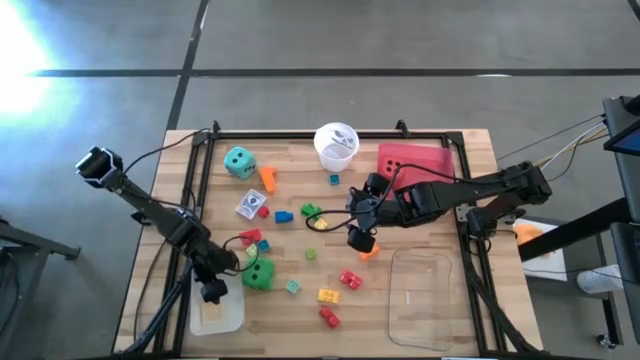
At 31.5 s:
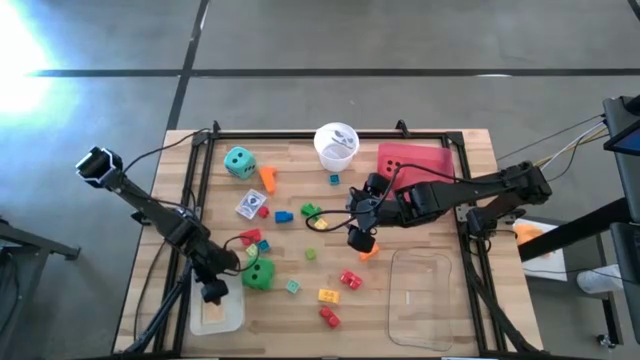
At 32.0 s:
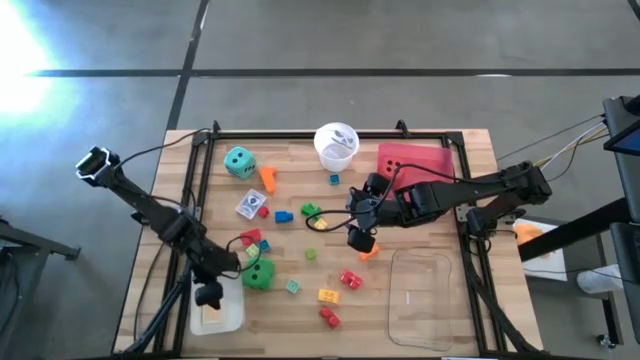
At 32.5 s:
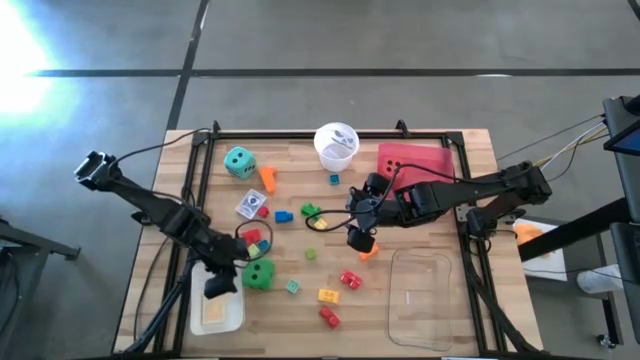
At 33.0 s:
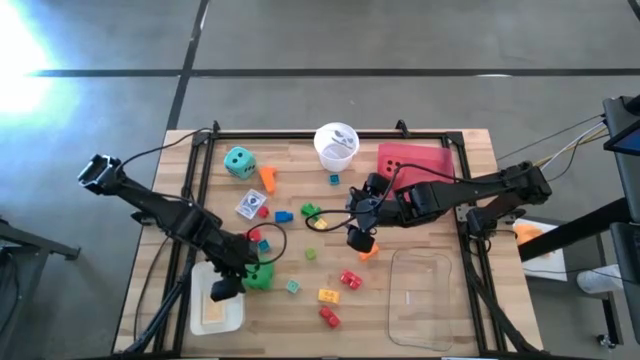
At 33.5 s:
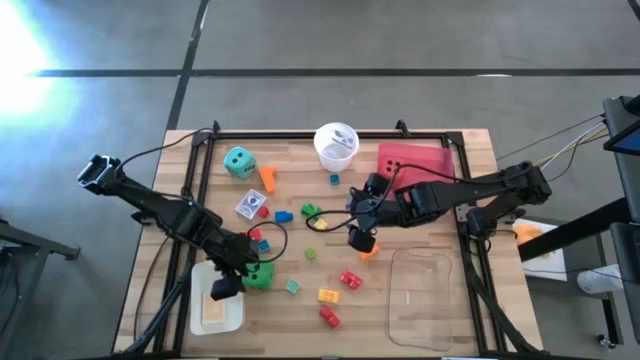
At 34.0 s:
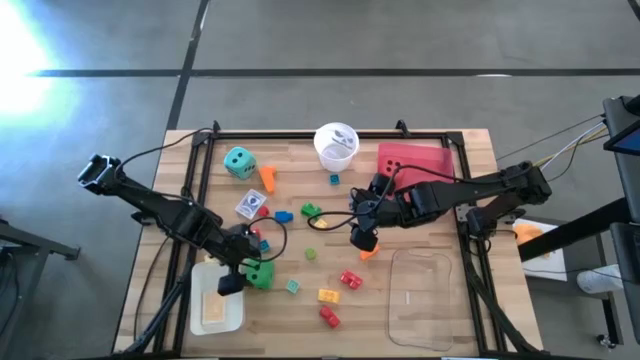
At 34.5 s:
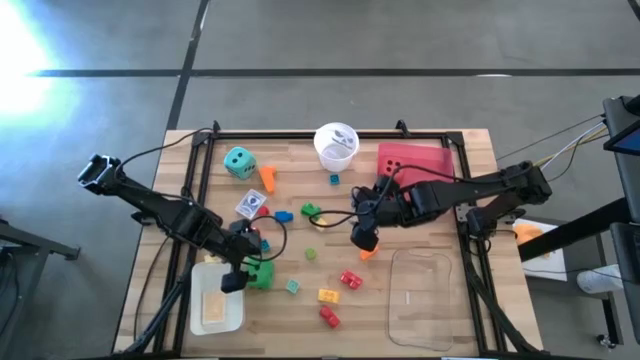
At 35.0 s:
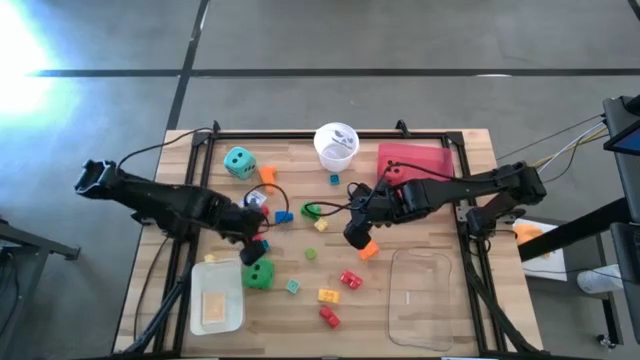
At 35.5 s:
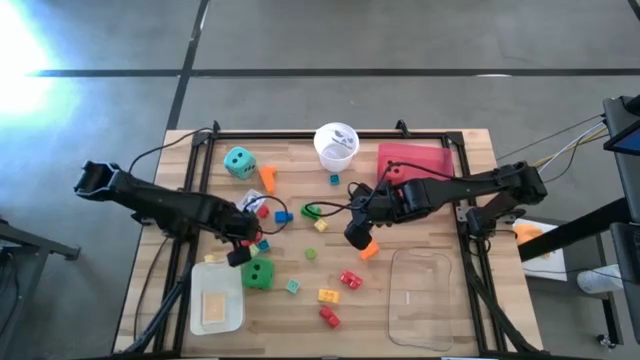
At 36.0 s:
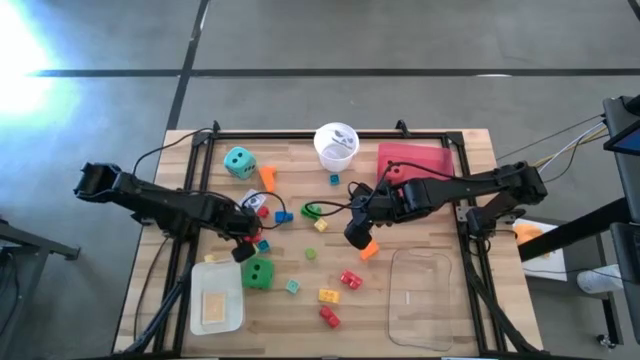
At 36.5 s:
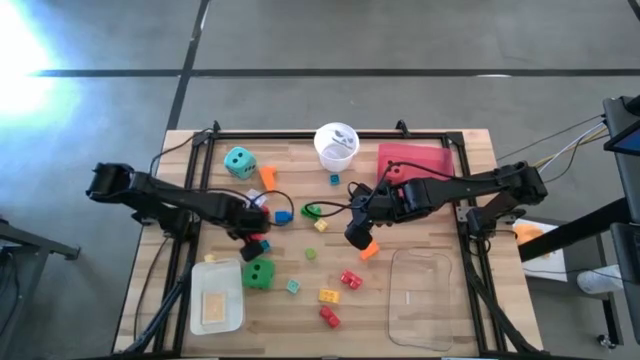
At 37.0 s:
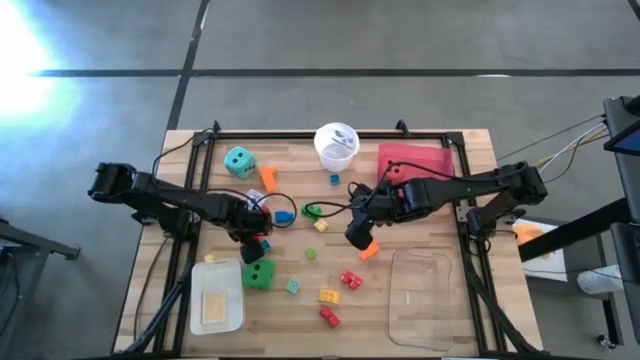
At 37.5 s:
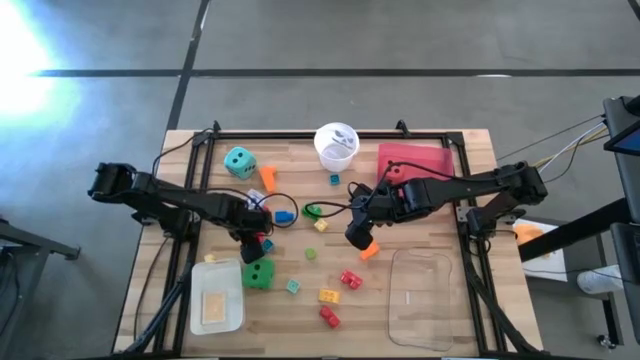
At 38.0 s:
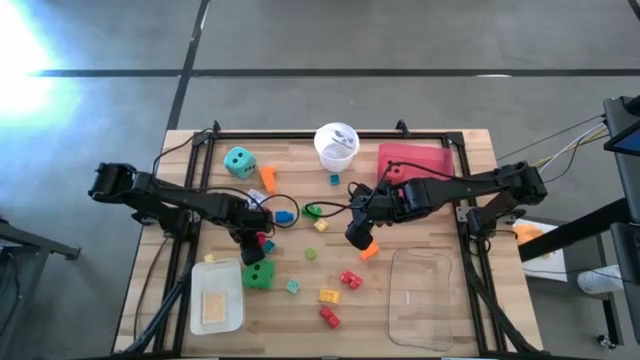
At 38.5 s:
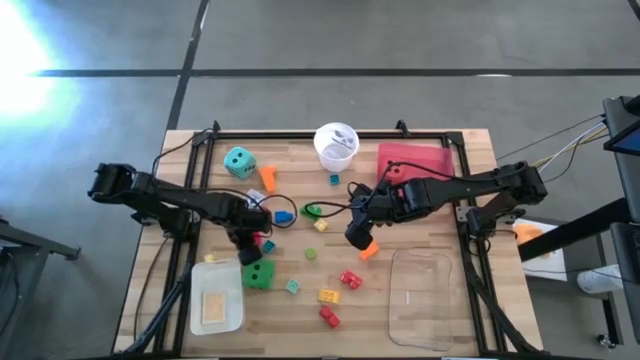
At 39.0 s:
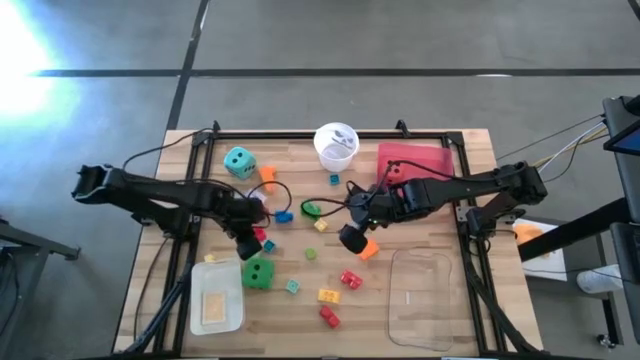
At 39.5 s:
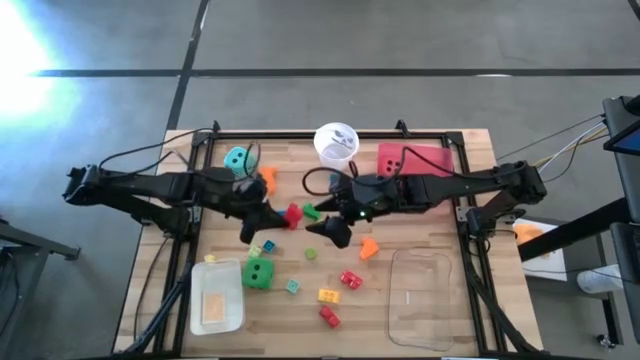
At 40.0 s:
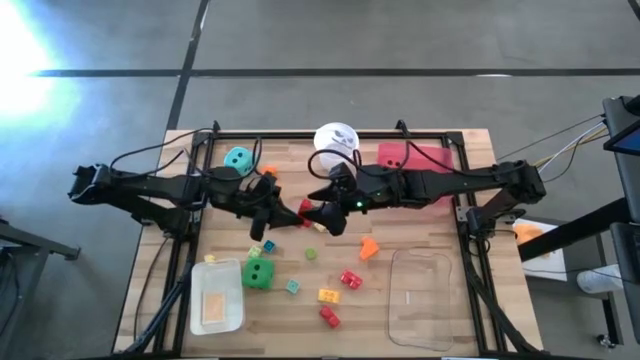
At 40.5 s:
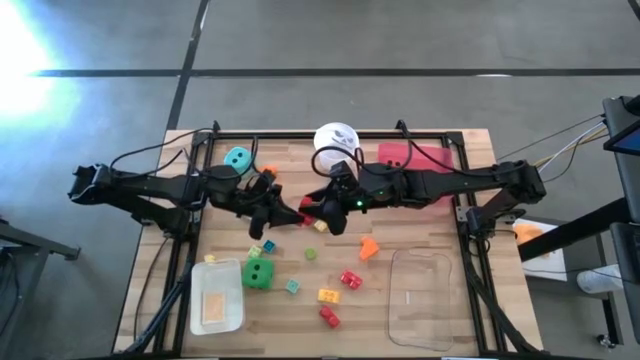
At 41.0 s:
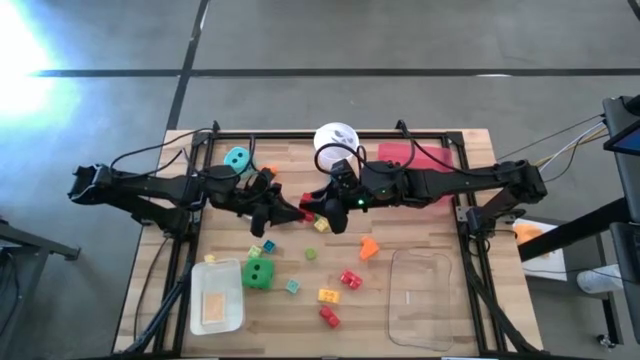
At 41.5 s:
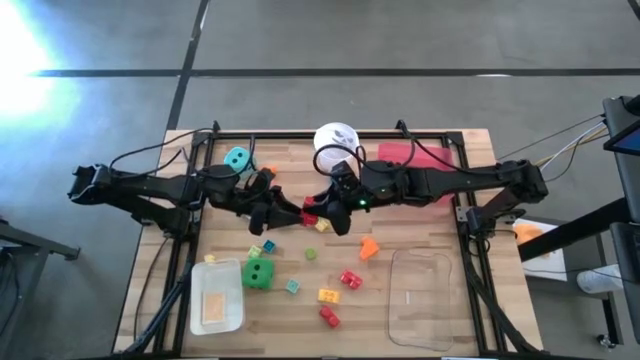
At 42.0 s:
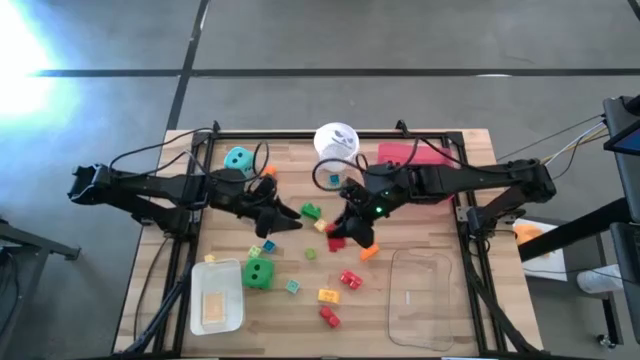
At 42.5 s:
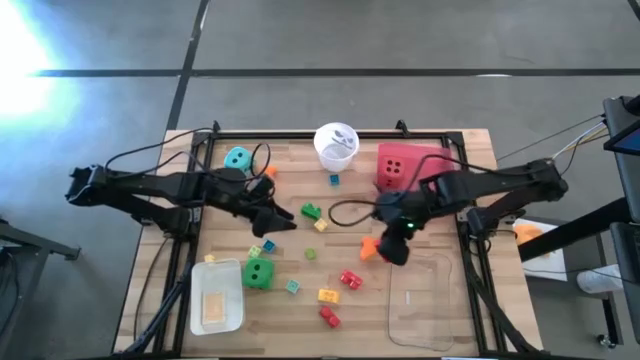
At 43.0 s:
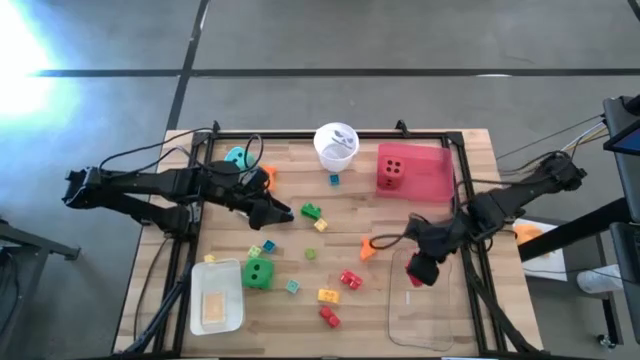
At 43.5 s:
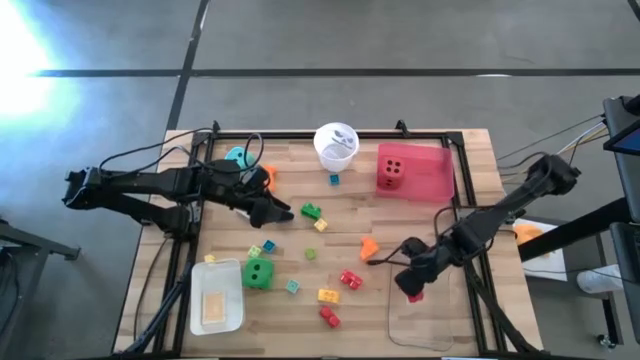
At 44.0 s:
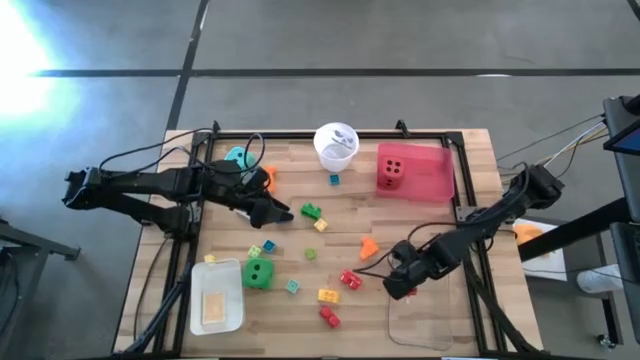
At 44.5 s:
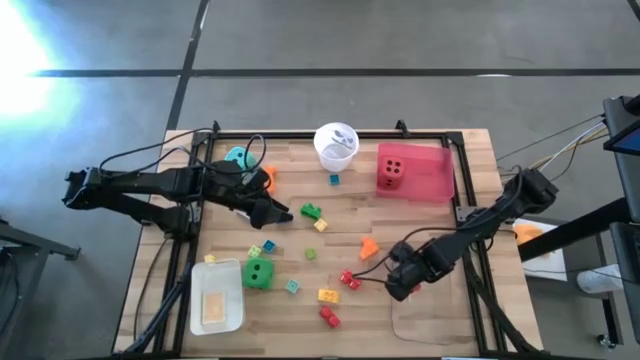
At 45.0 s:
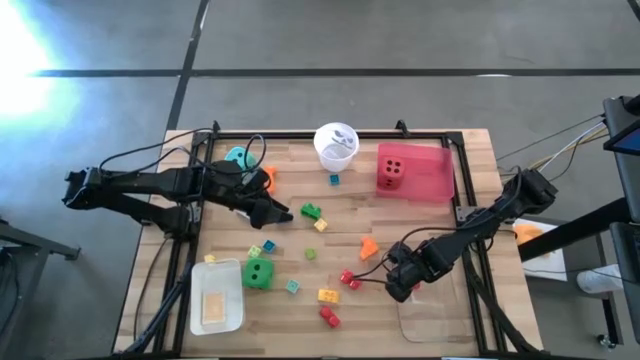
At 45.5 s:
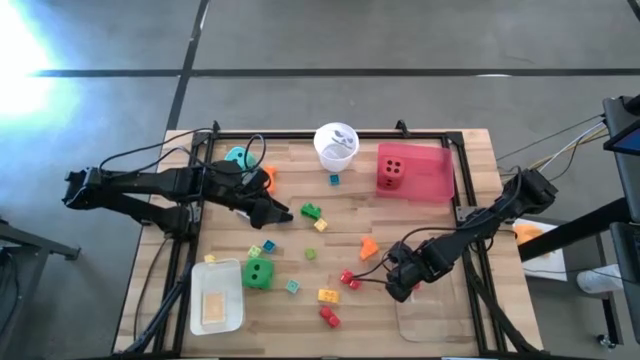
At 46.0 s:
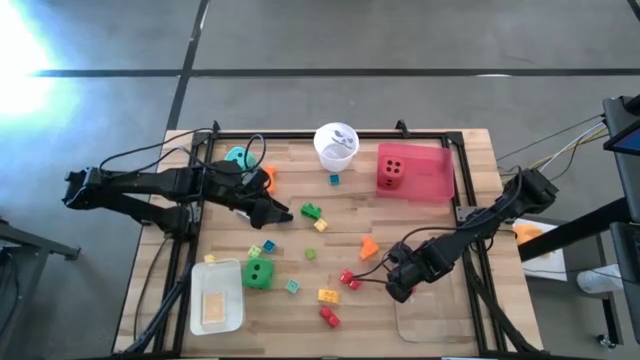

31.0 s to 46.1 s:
Task: Pick & Place Toys
Put the red game piece into the transparent bin

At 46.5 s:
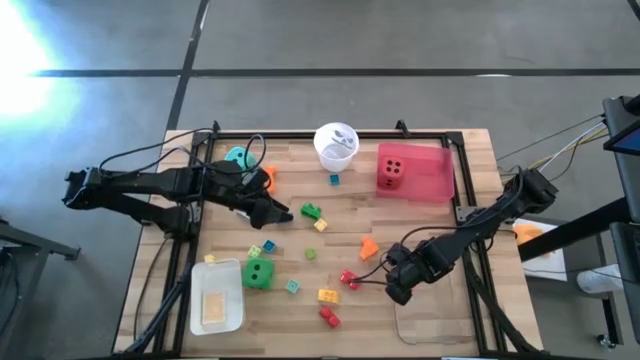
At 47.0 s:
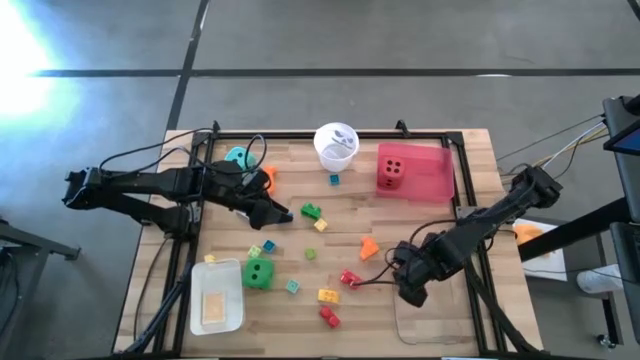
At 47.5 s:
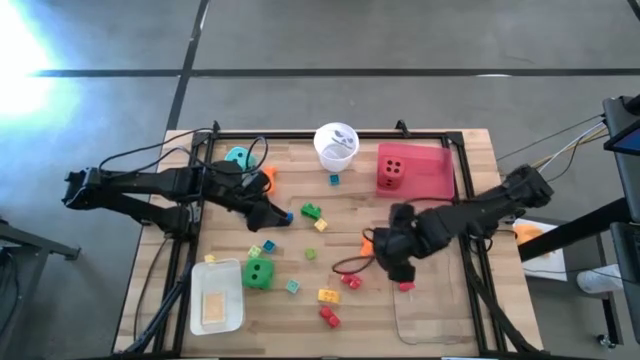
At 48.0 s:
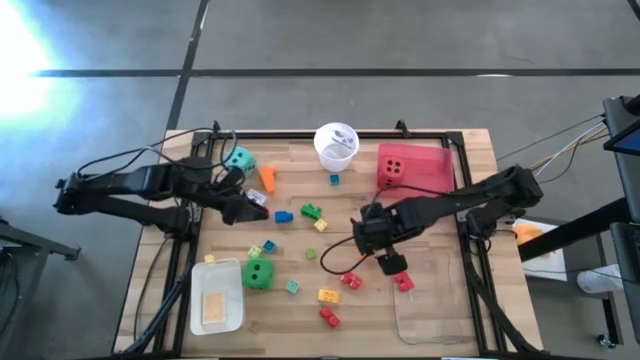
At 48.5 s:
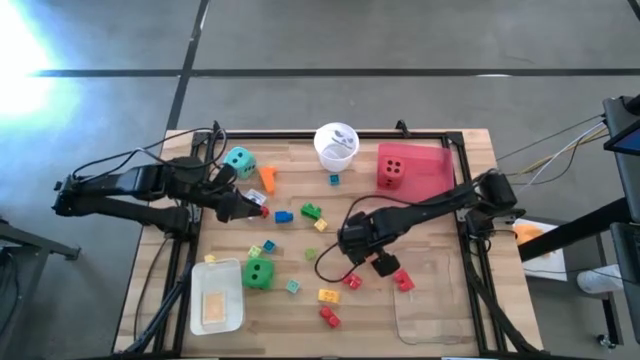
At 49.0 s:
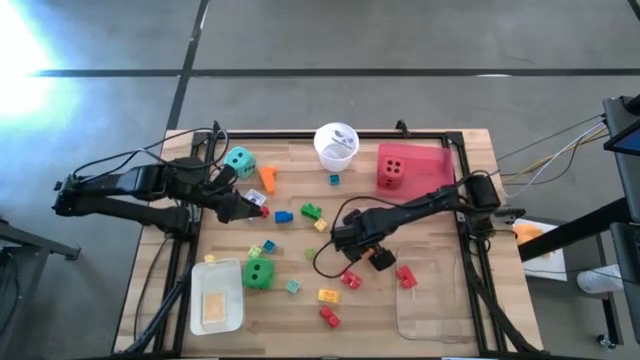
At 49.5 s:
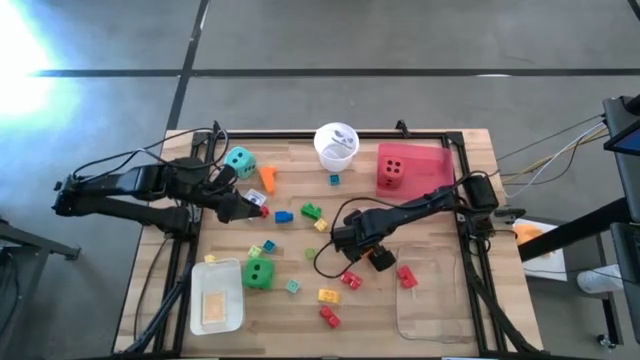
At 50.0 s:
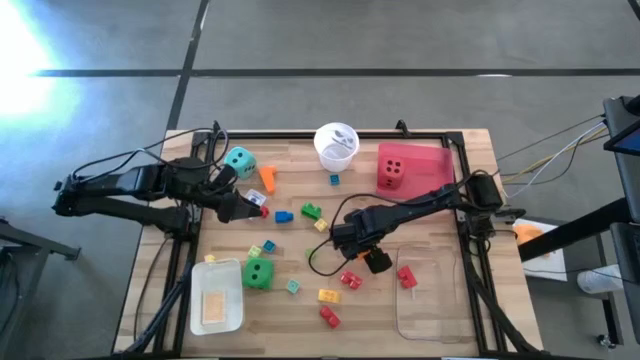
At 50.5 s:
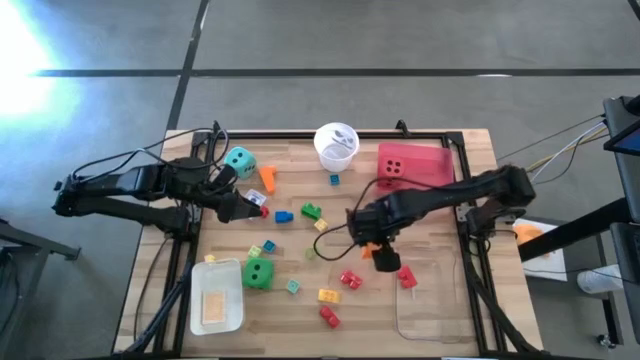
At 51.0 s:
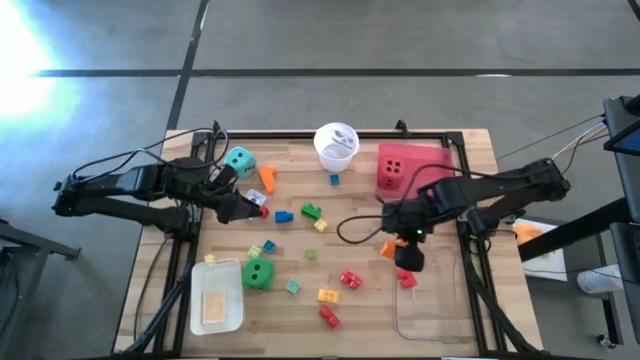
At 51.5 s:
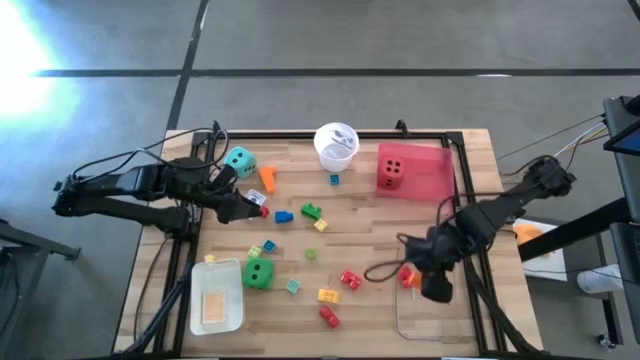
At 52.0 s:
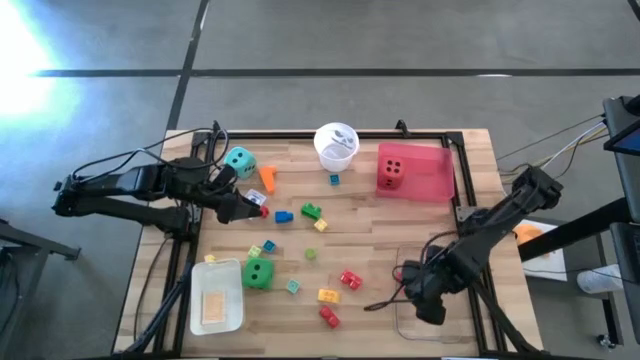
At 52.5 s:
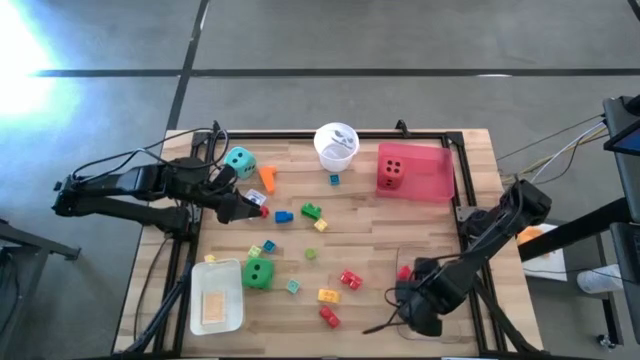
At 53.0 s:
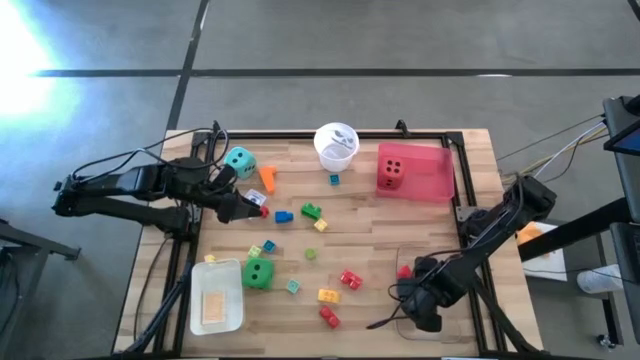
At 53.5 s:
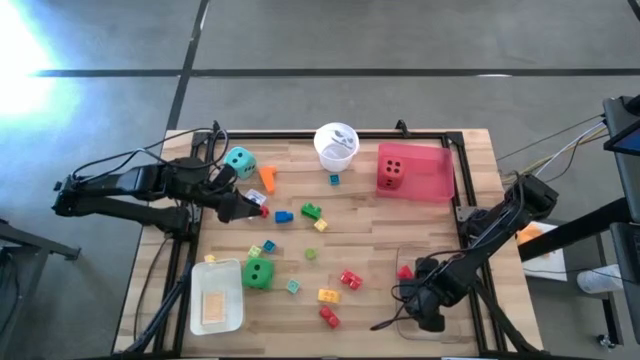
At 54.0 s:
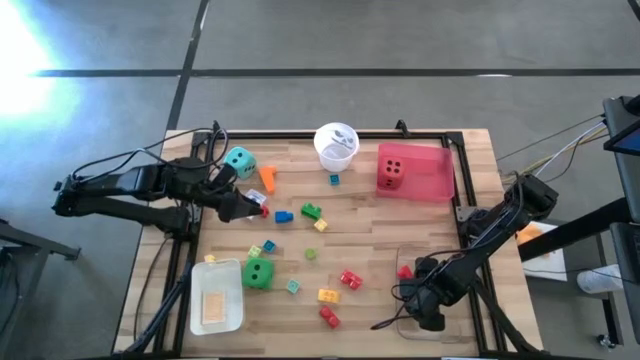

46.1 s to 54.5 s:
Put the orange game piece into the transparent bin
